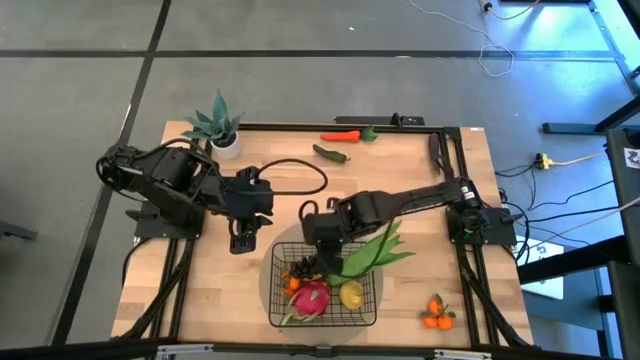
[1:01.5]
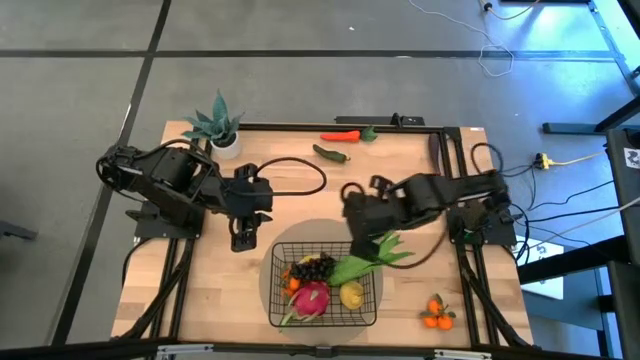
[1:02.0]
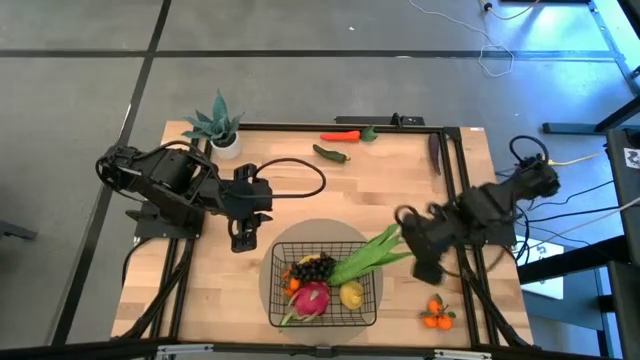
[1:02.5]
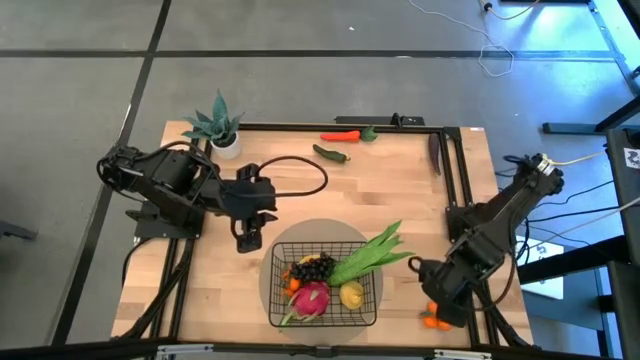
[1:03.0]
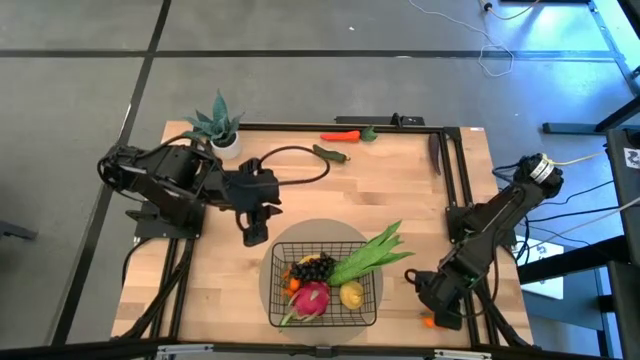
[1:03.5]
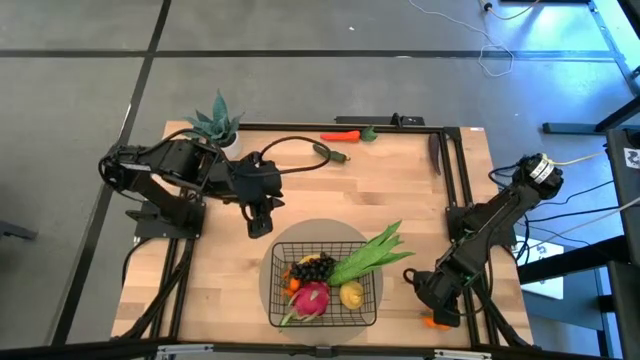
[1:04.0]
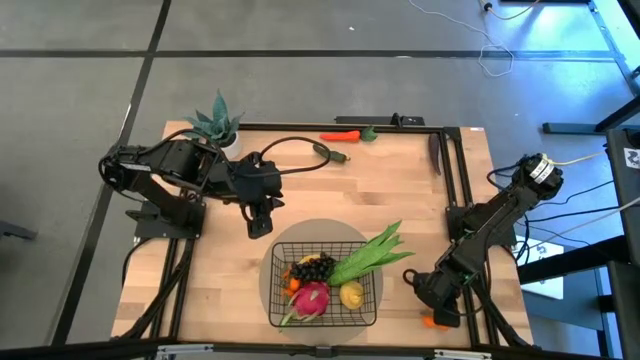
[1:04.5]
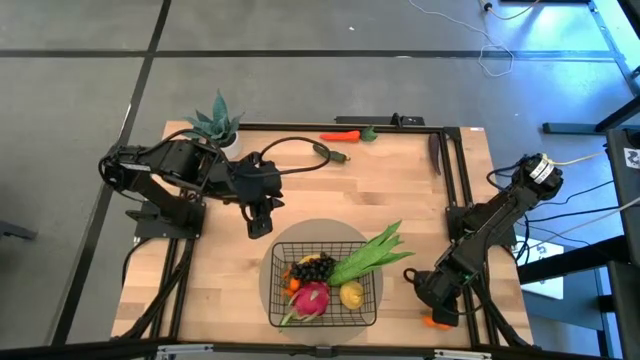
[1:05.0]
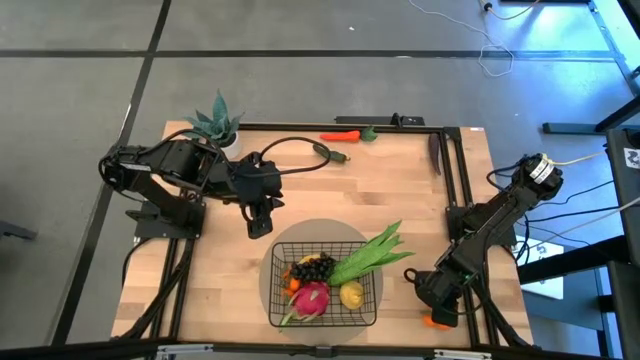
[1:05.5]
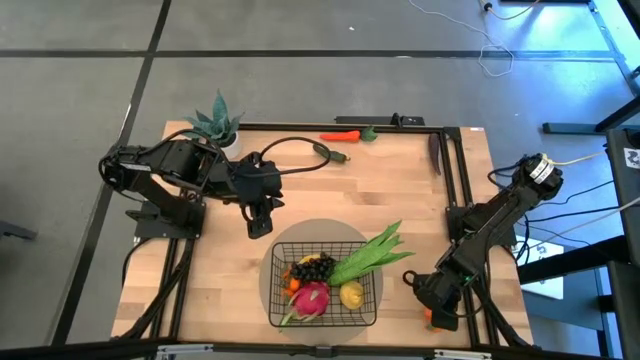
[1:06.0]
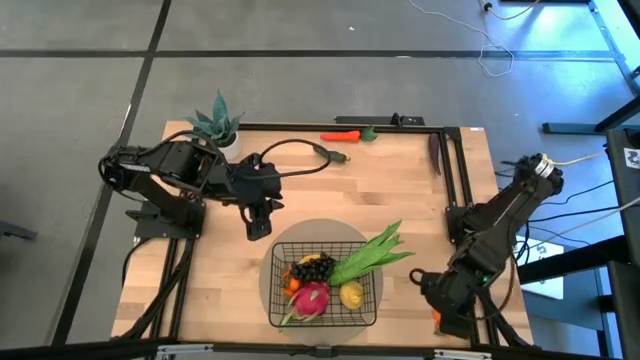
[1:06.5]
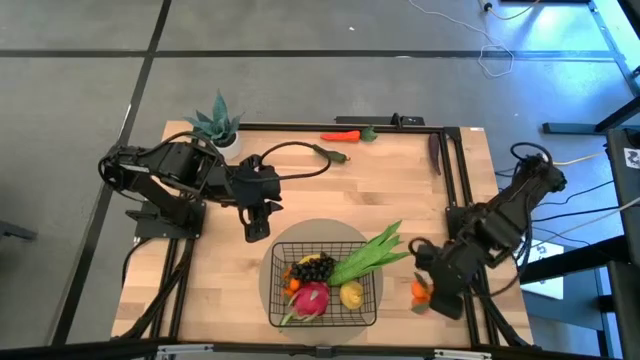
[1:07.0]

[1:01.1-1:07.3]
Task: Build produce basket
Put the bunch of oranges into the black mesh basket

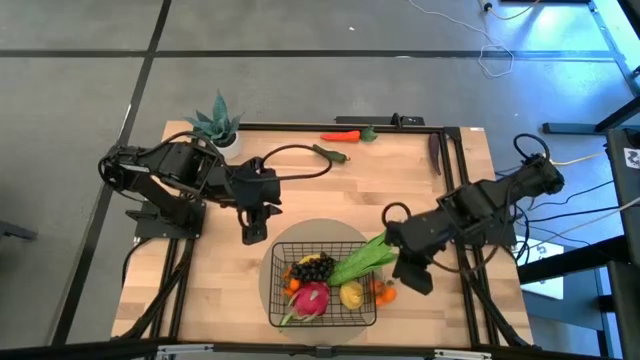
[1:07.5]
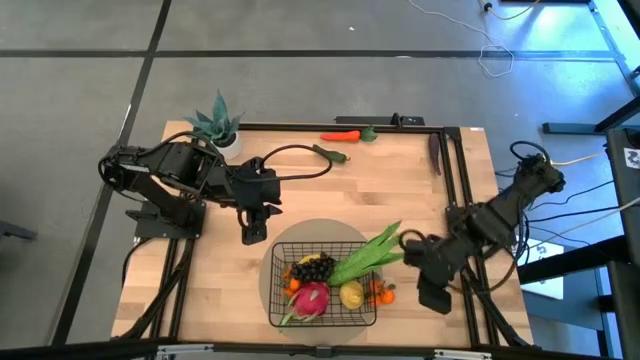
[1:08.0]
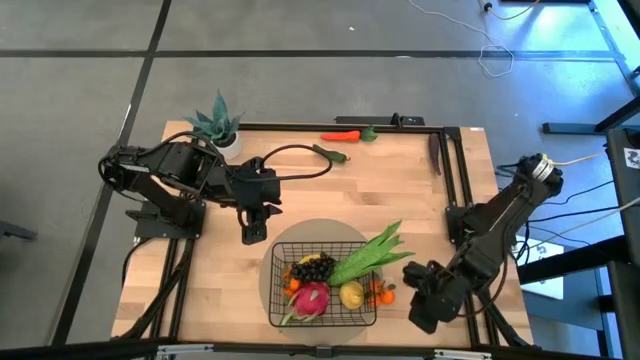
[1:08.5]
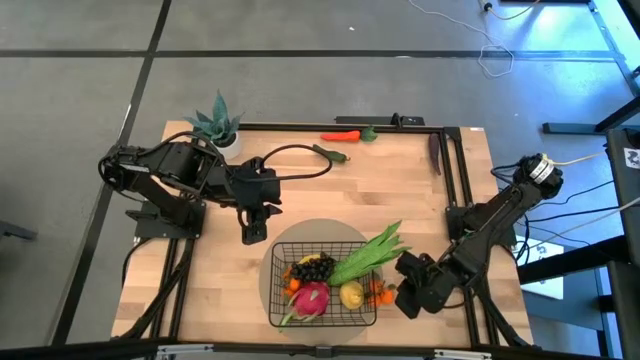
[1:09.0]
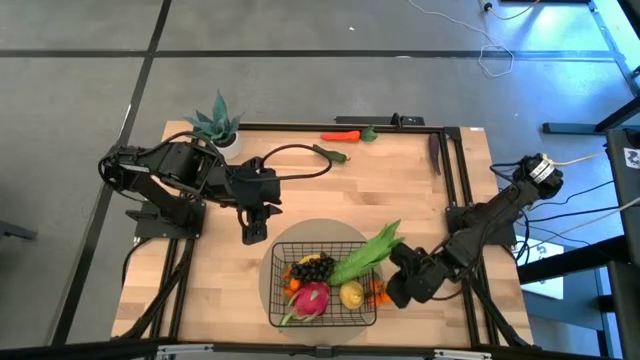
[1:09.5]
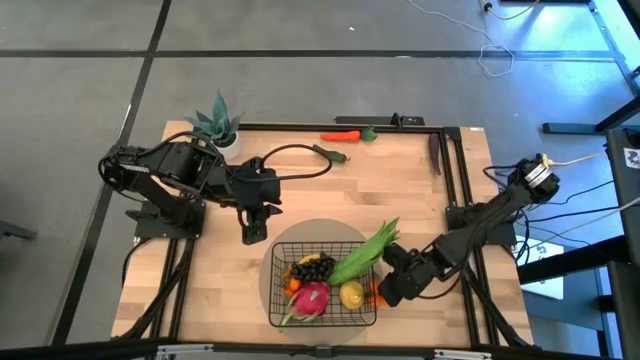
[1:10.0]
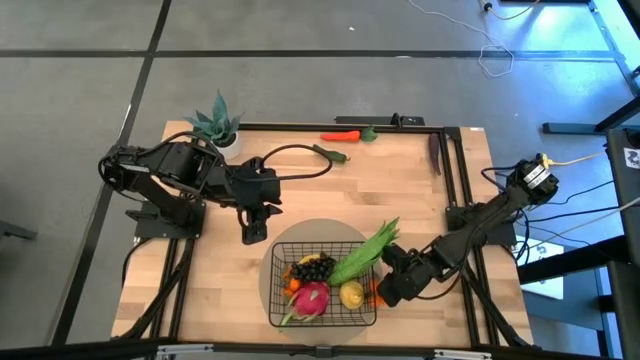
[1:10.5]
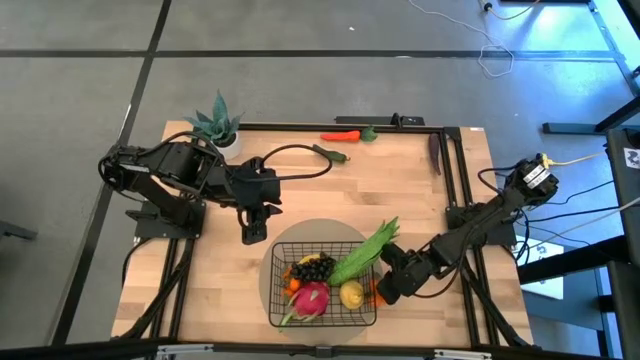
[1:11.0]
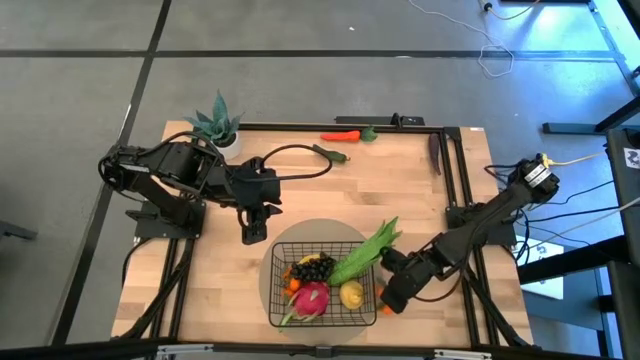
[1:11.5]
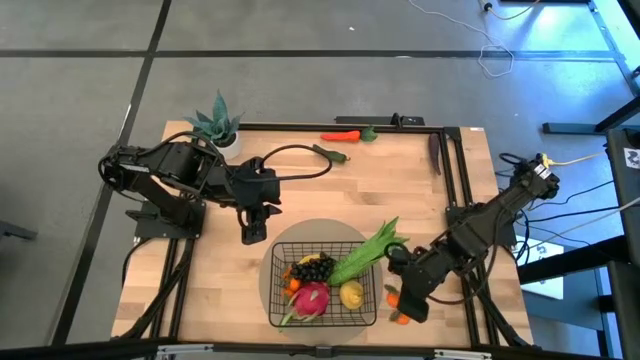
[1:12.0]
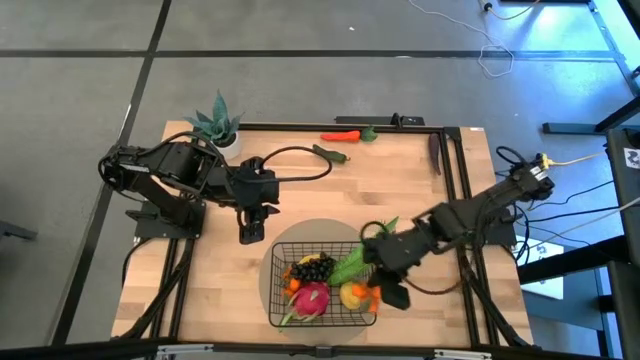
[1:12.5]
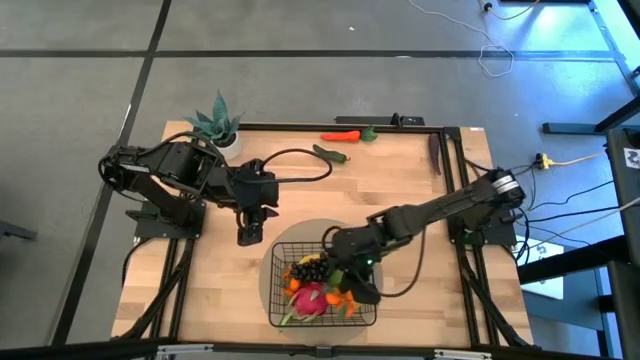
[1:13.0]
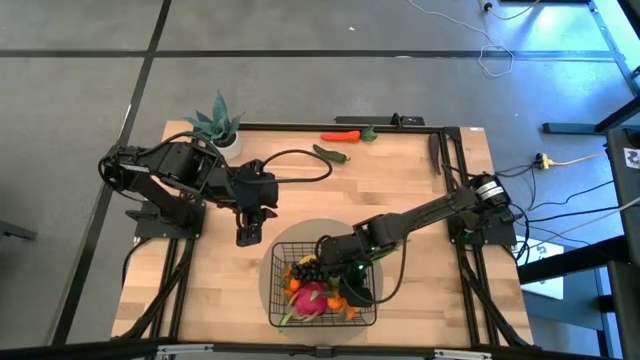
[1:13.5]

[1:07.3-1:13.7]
Put the bunch of oranges into the black mesh basket

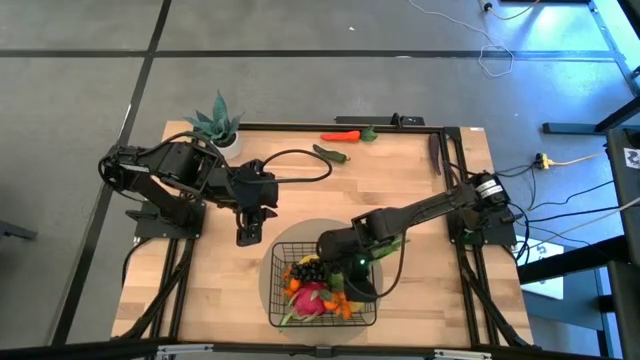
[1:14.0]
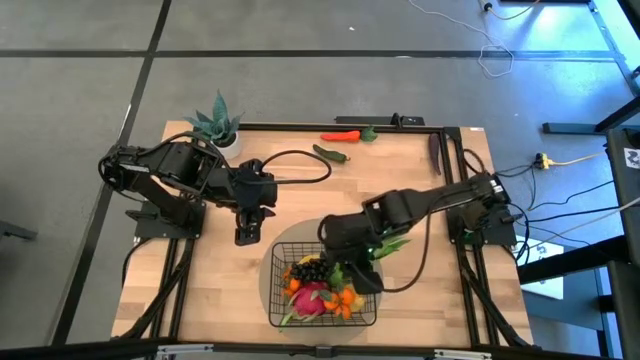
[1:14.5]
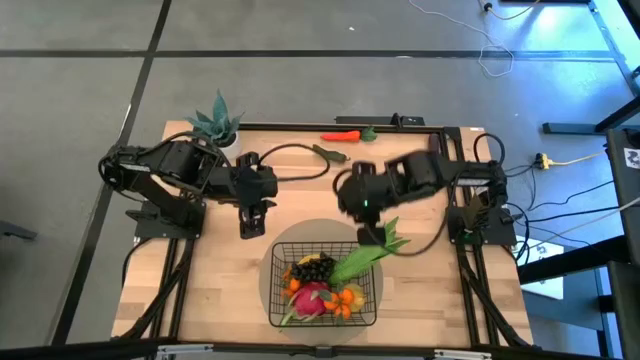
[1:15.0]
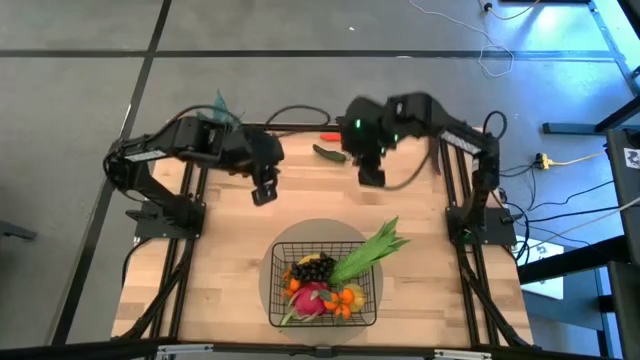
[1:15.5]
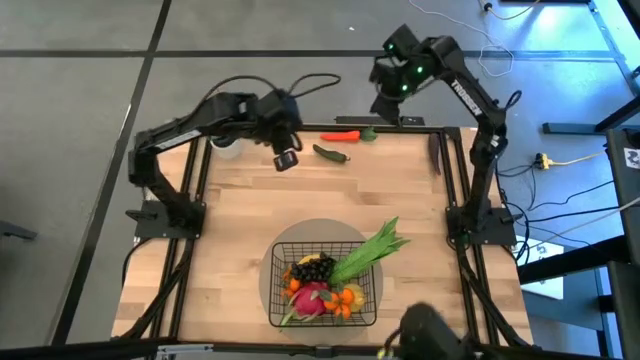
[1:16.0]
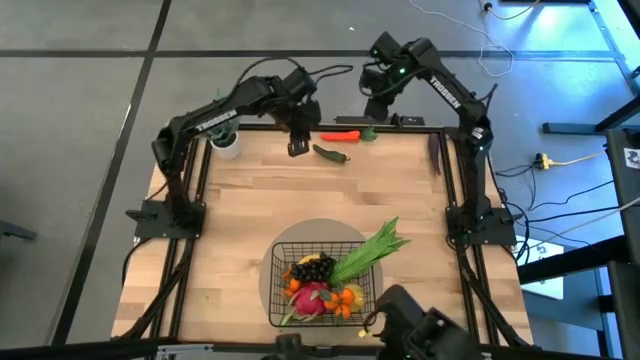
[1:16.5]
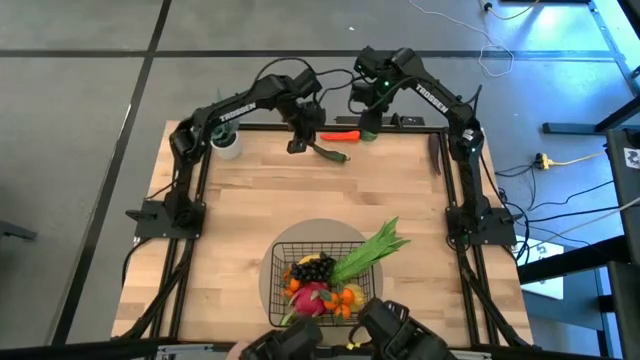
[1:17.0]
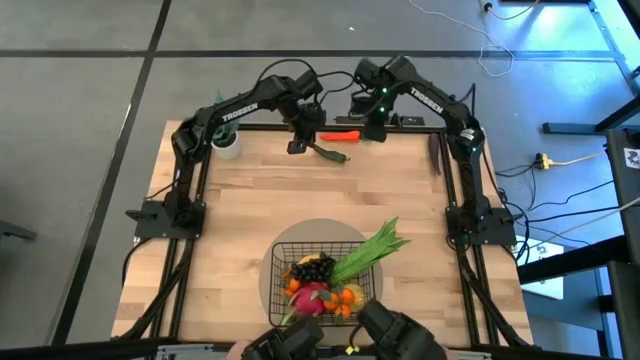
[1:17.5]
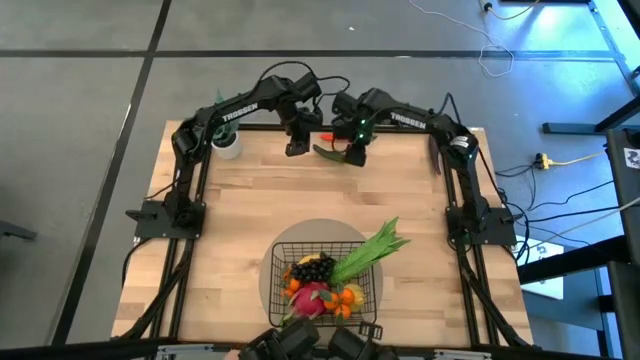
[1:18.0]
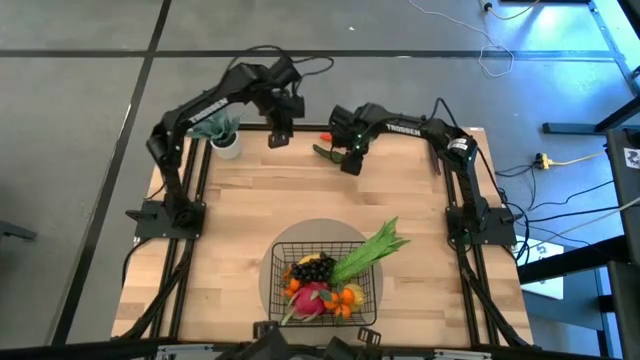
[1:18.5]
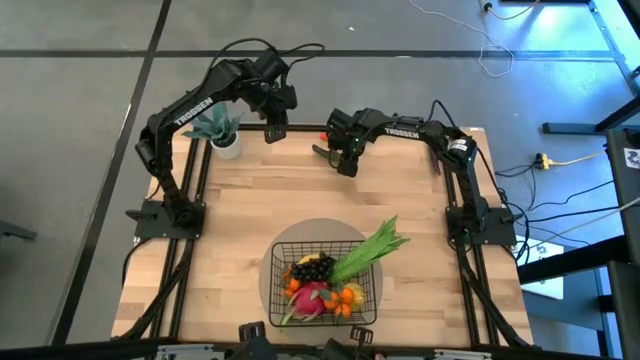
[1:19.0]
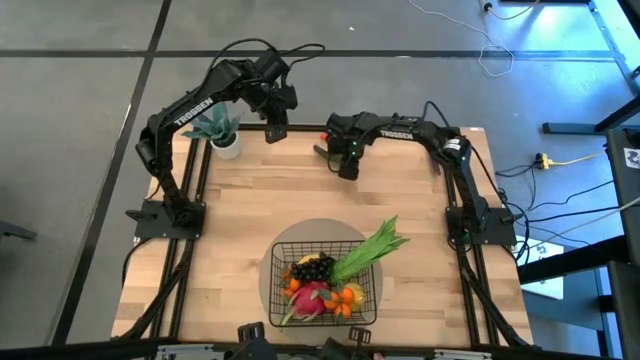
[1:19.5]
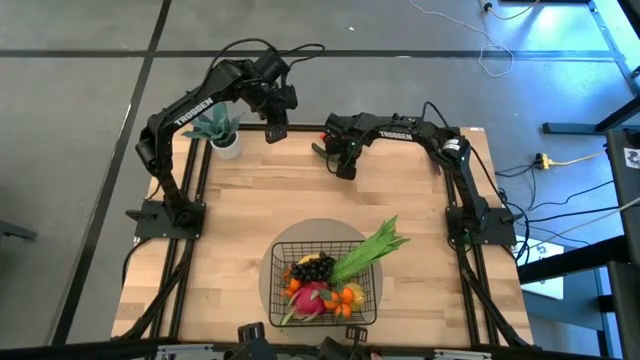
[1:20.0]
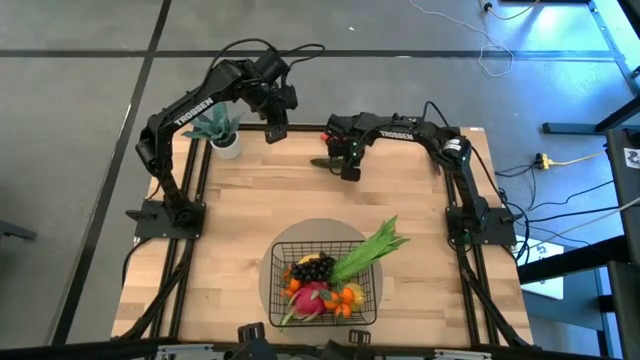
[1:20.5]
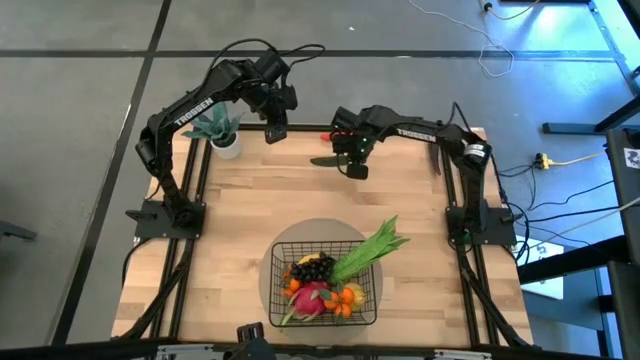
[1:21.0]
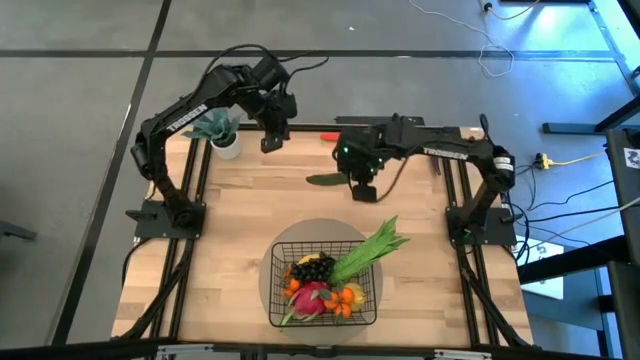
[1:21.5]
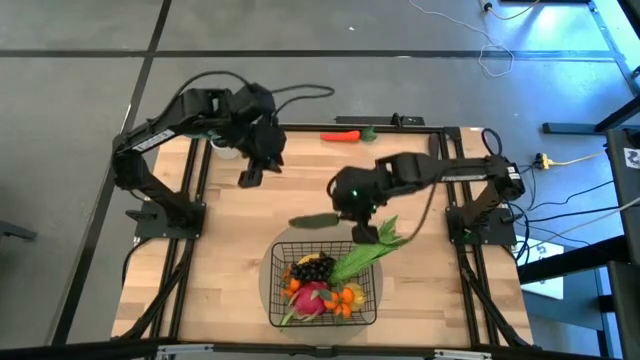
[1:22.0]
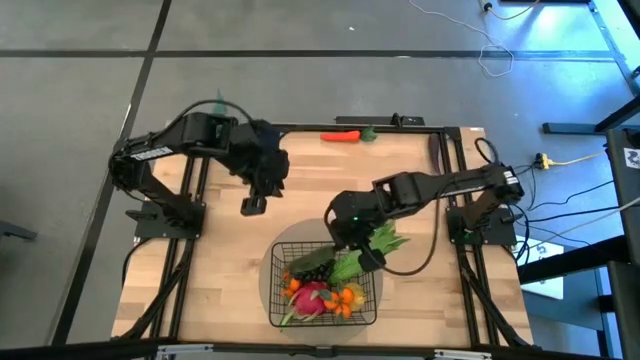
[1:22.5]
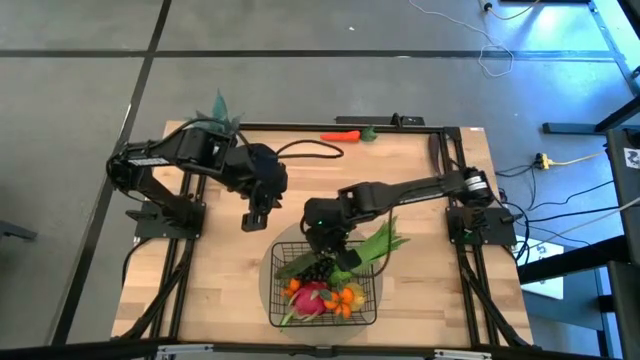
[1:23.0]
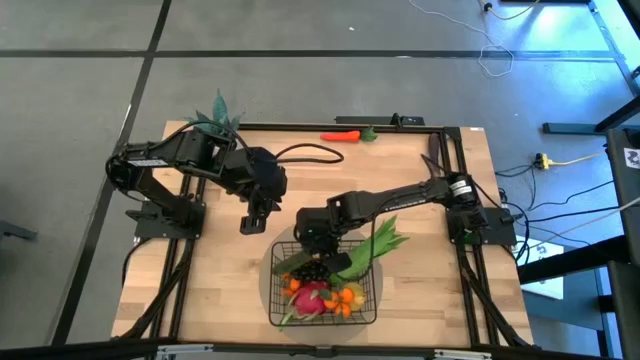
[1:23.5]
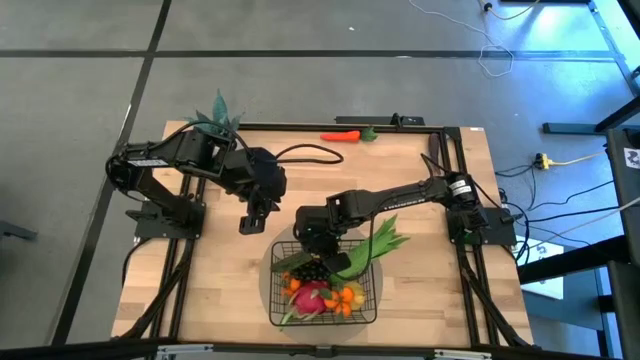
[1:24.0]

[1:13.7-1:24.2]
Put the green chili pepper into the black mesh basket
